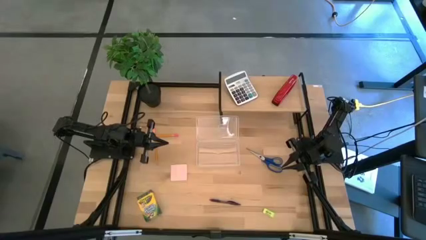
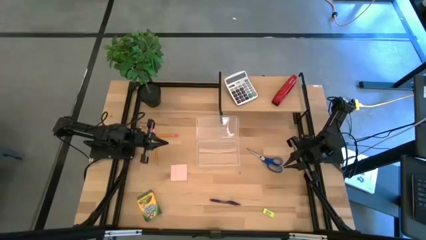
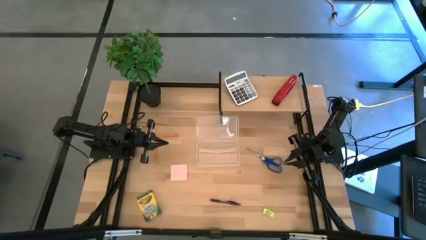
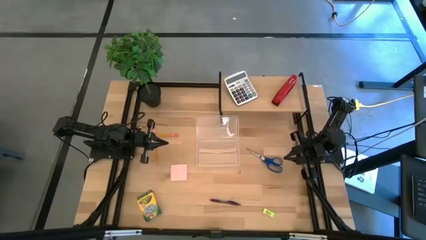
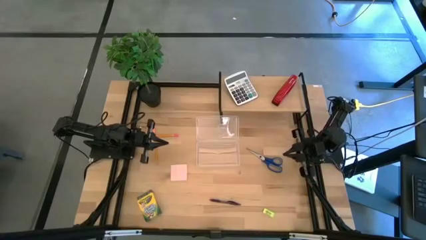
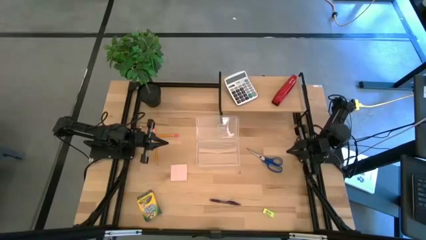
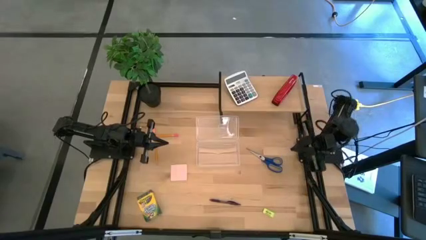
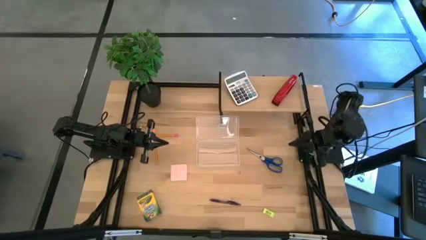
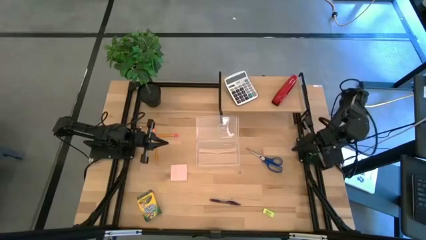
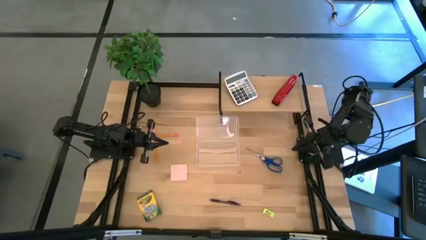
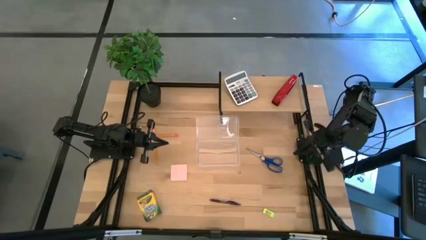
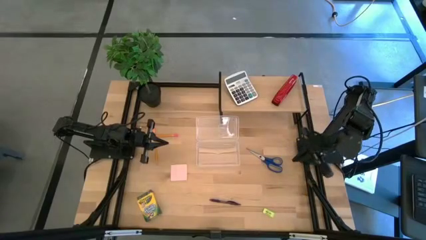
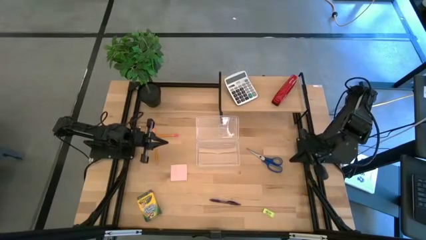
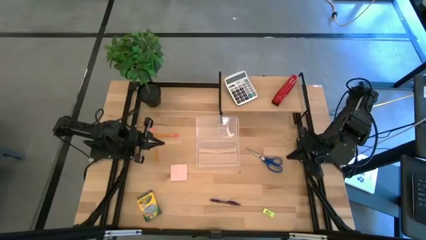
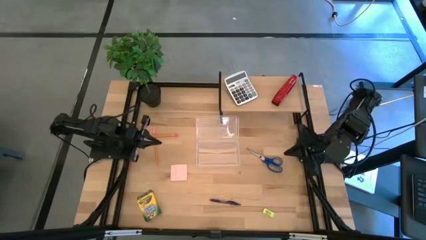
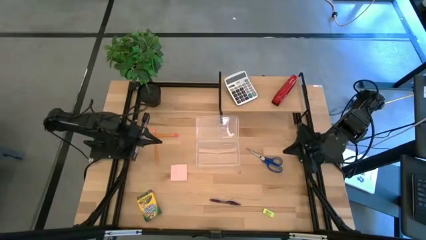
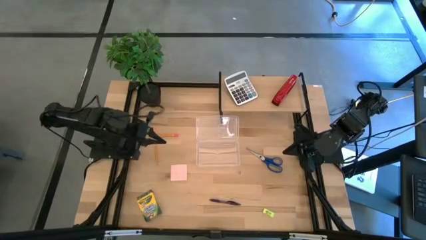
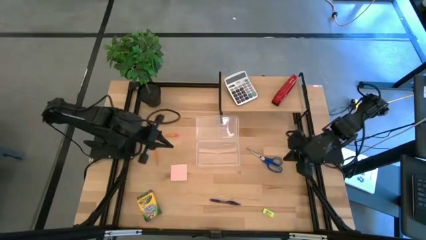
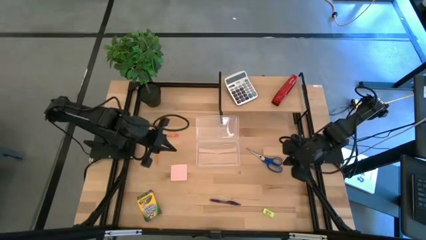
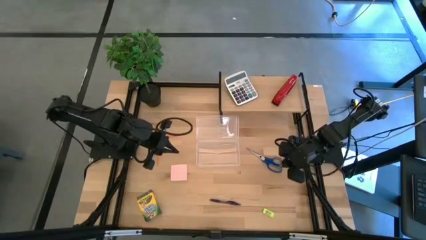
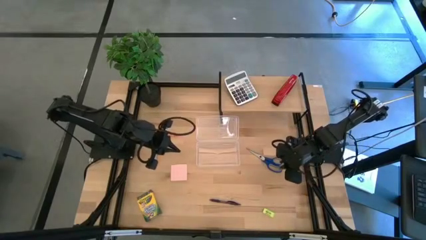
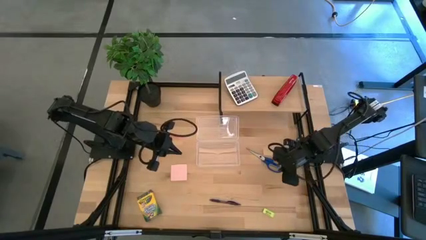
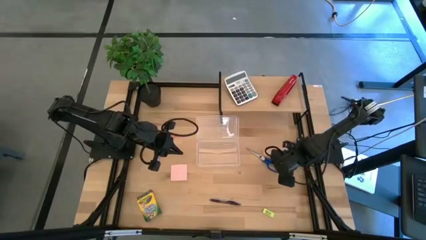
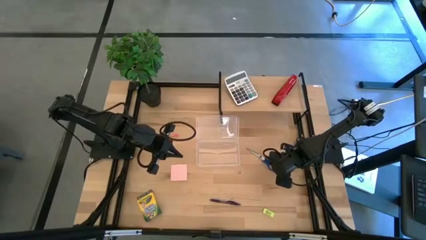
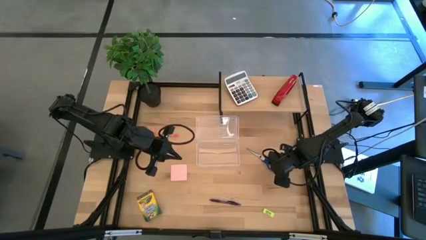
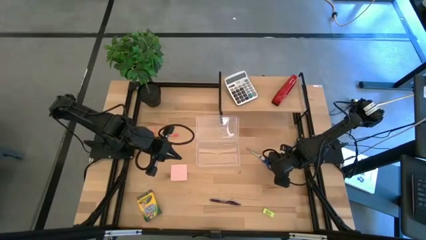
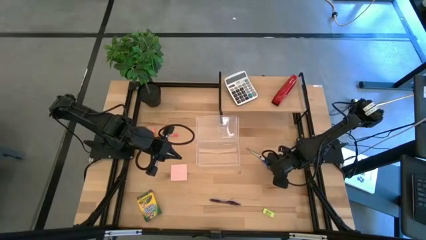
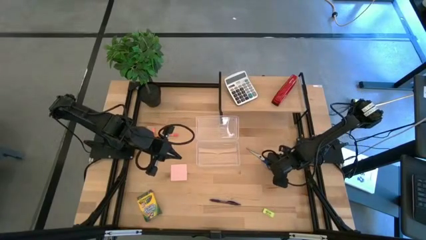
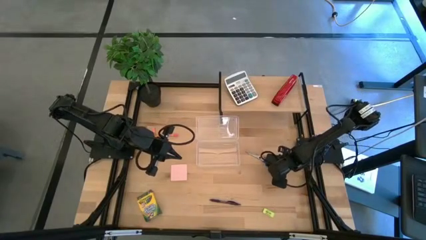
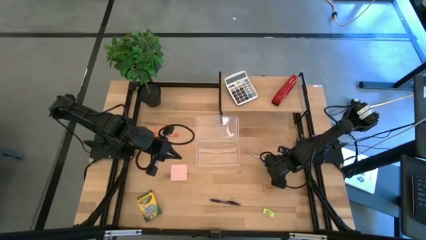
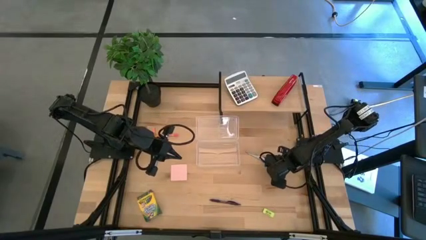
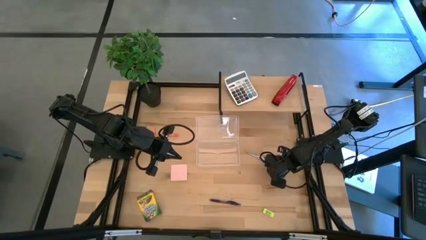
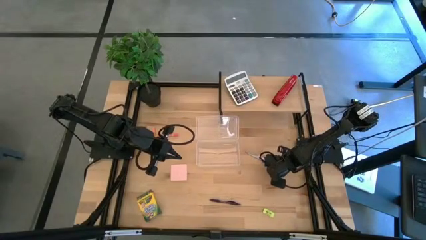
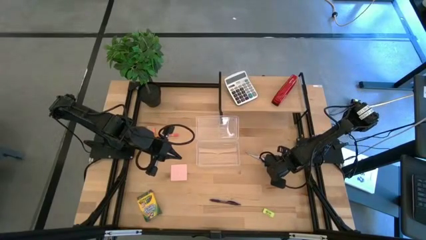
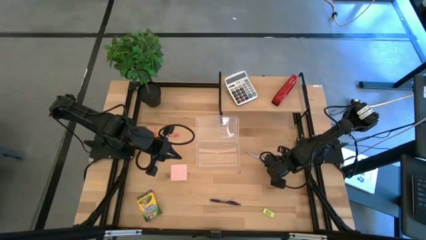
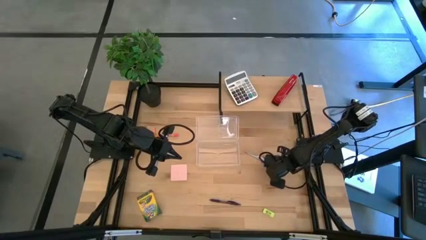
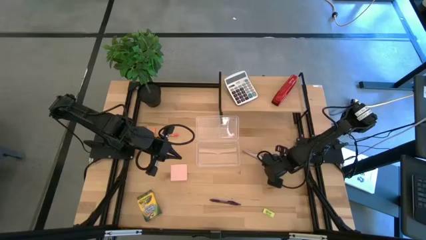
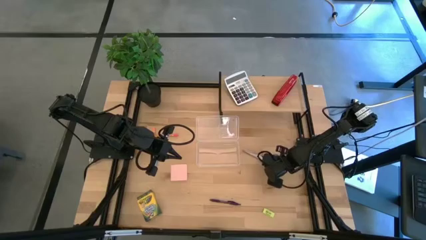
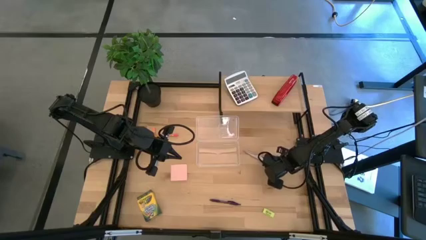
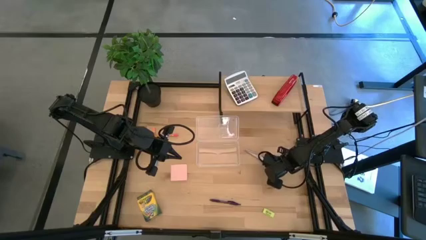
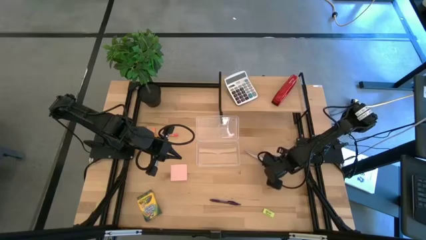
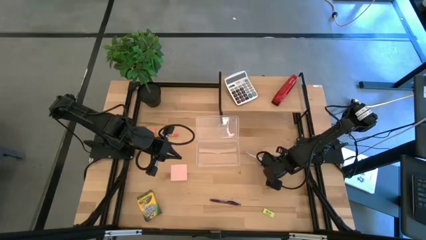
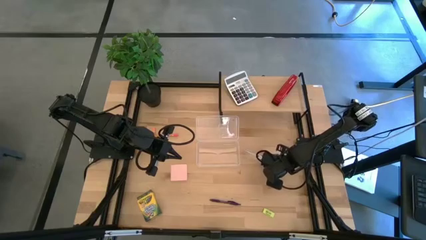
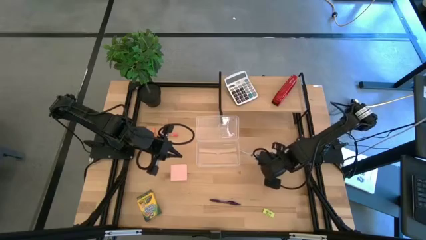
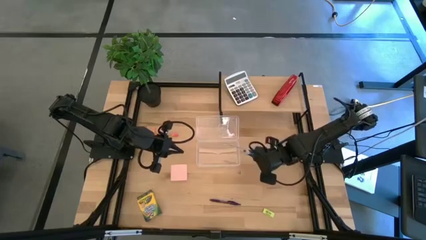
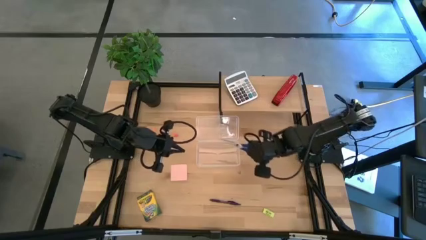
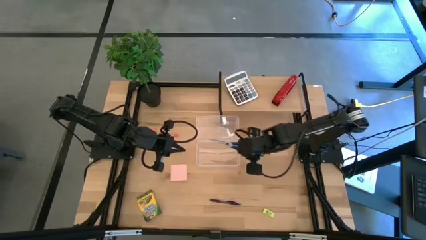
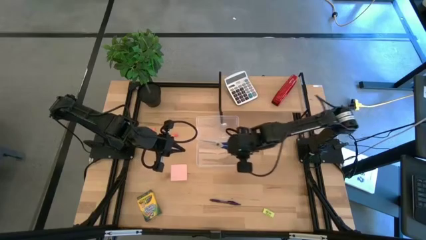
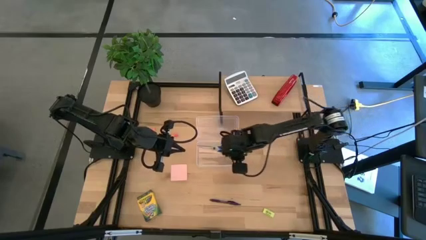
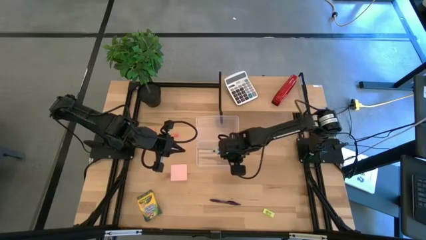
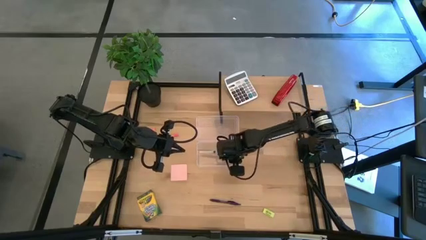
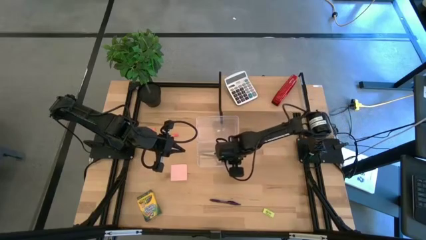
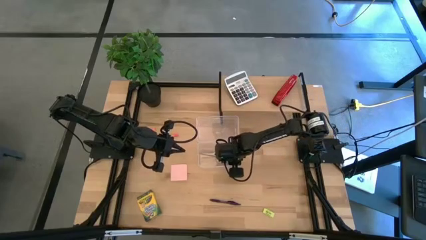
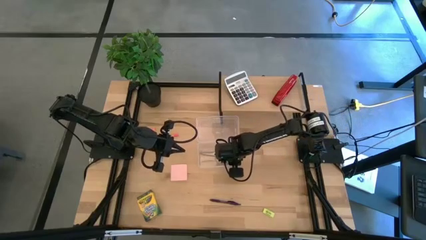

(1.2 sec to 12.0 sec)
Task: Pack school essentials
Put the blue scissors into the transparent supply box

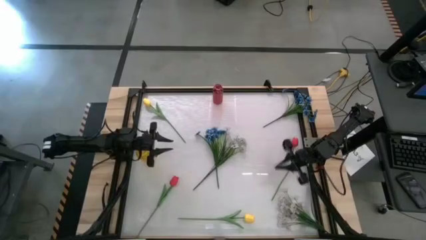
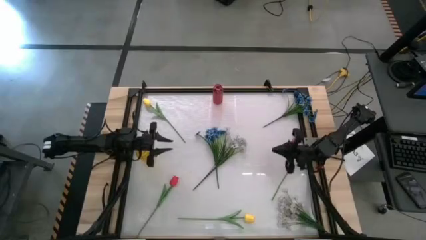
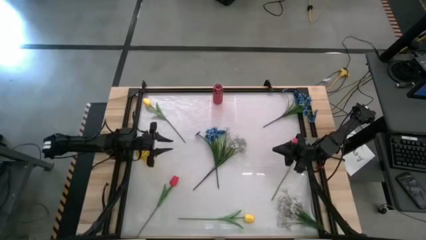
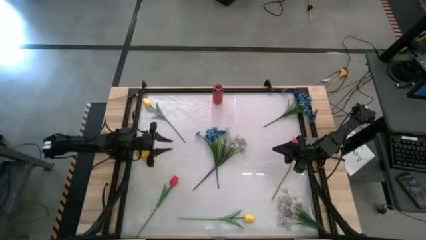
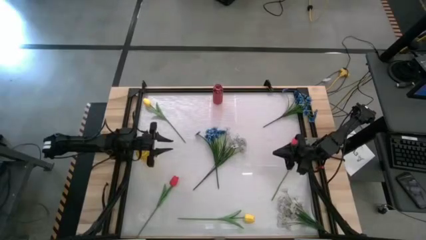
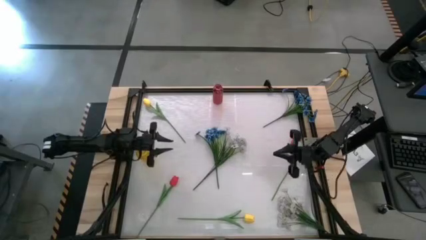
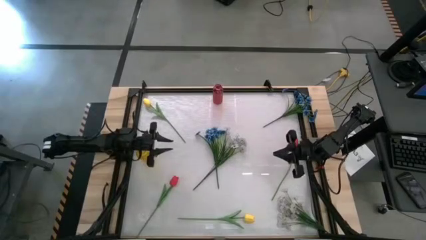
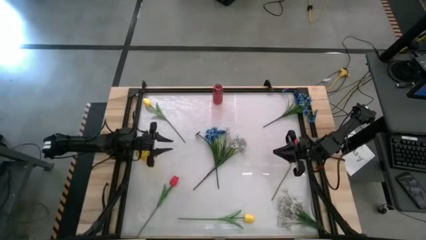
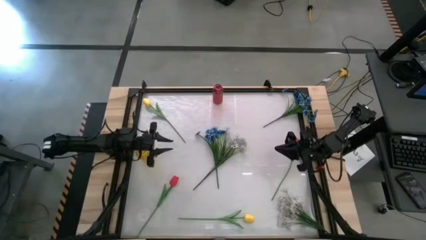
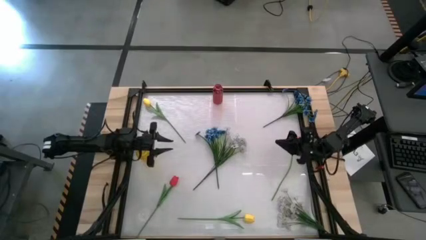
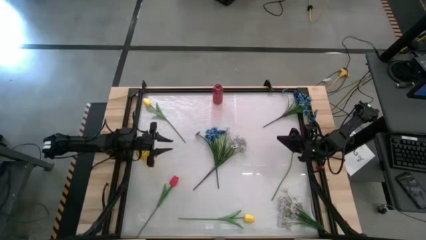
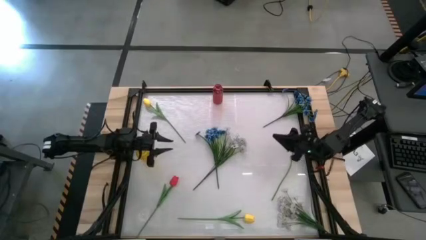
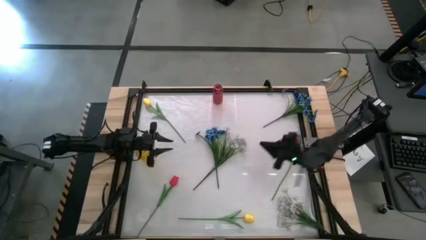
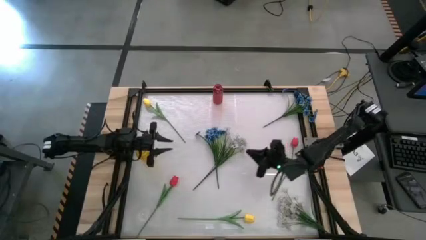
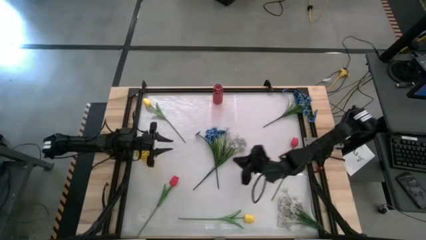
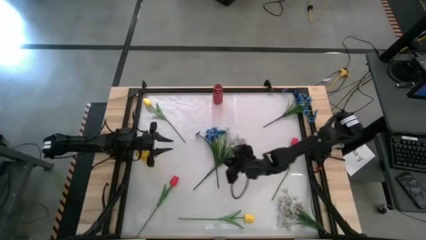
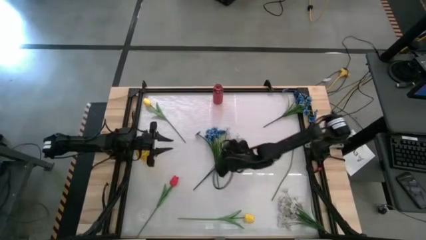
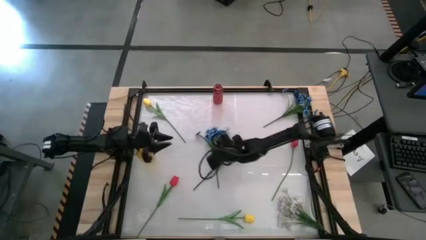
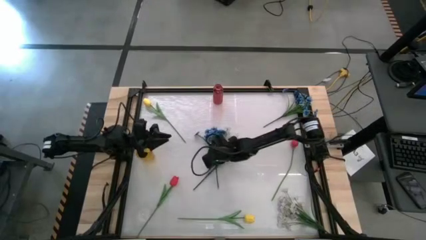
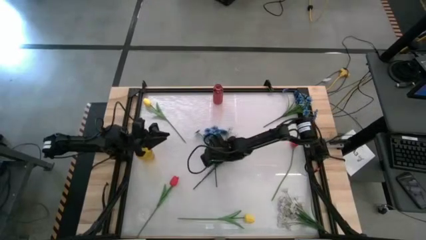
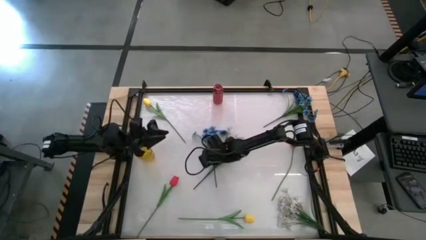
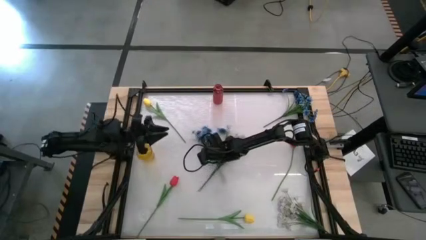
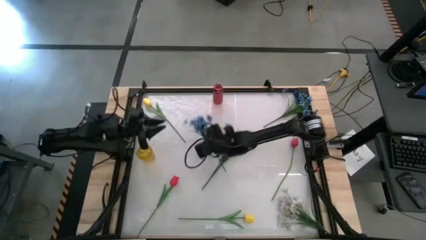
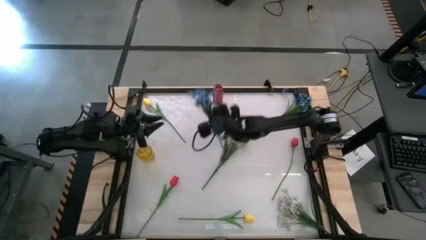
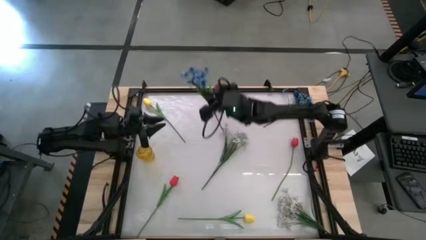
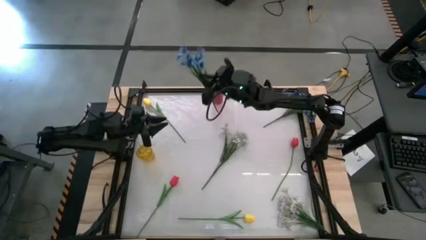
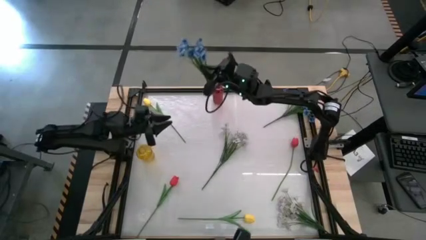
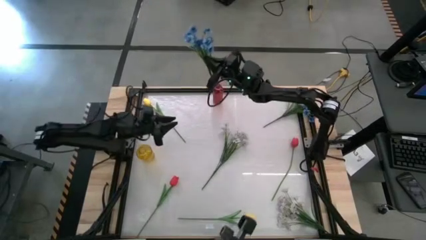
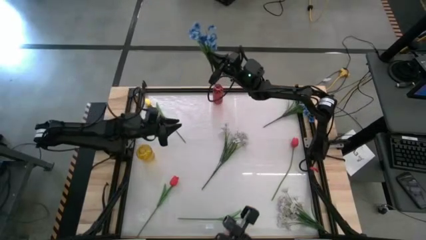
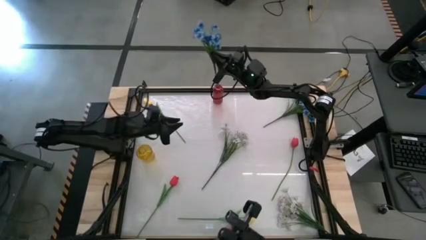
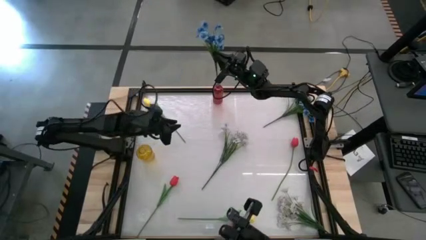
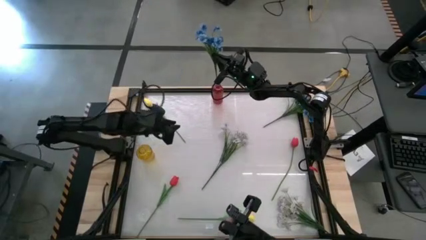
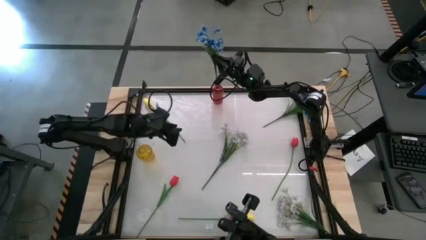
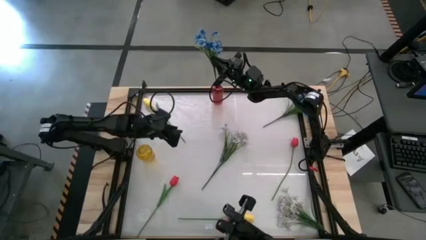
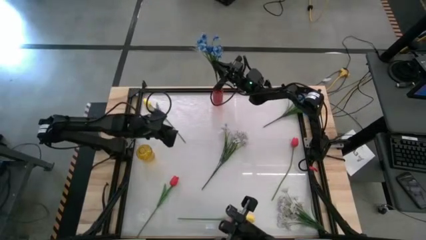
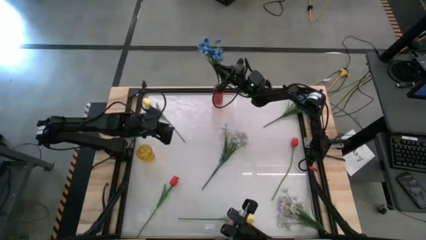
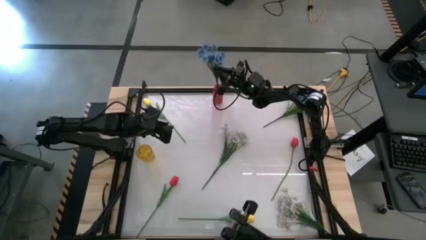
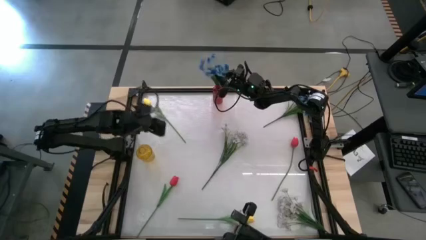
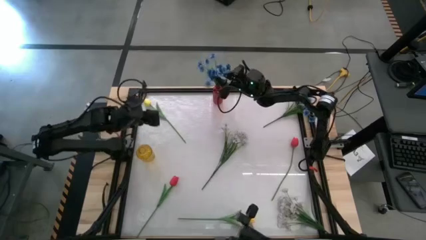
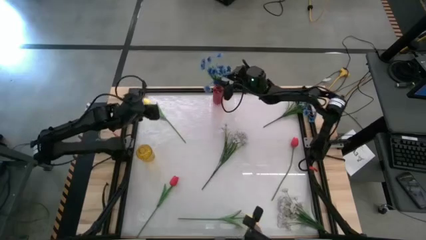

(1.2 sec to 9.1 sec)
Task: Sort flowers into vase by color
Put the left blue flowers into the red flower vase
